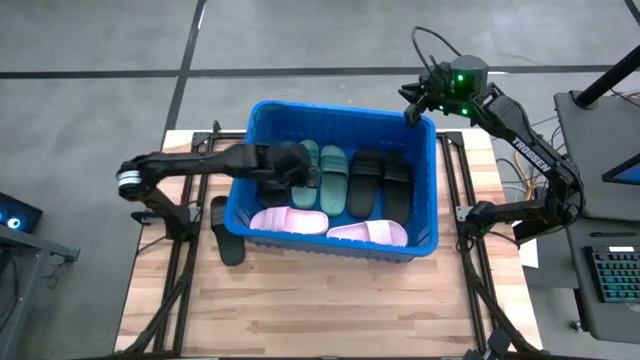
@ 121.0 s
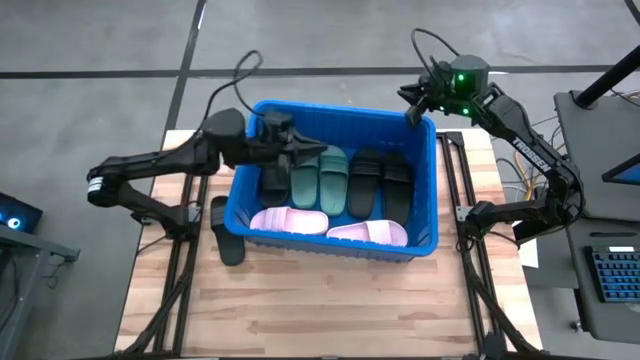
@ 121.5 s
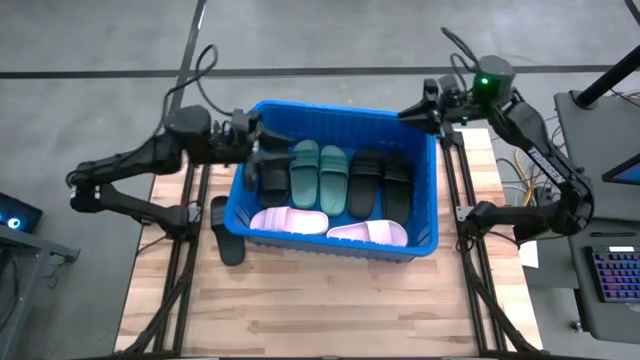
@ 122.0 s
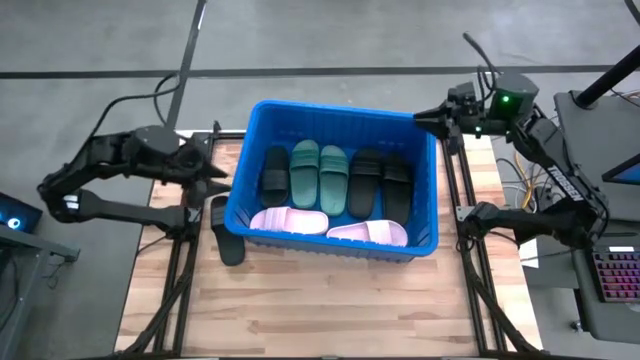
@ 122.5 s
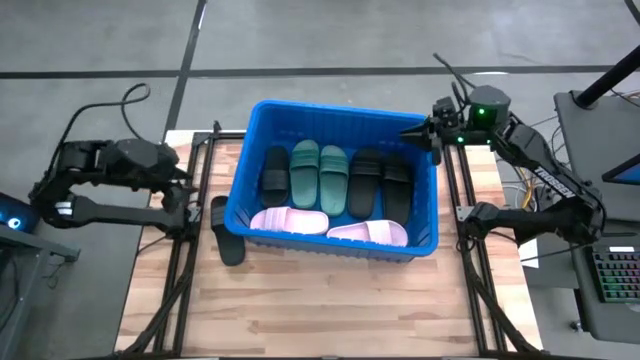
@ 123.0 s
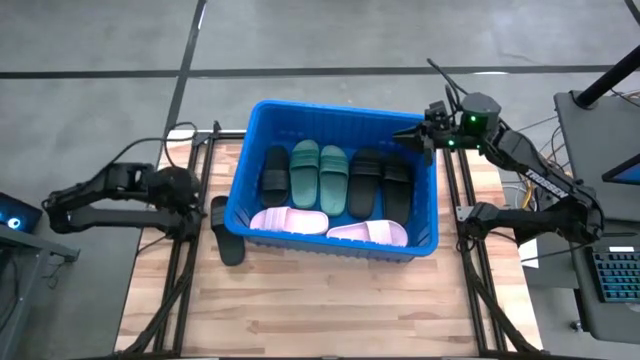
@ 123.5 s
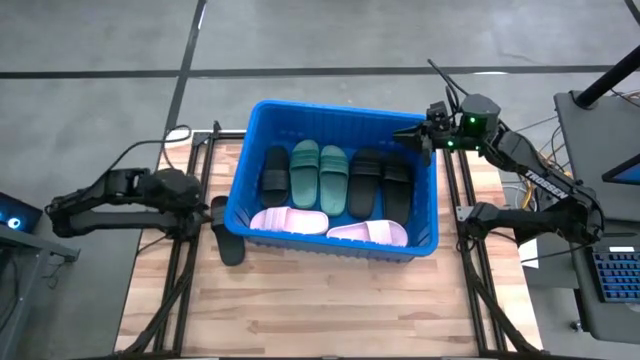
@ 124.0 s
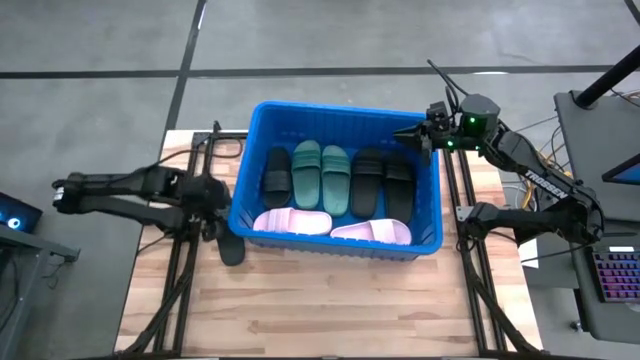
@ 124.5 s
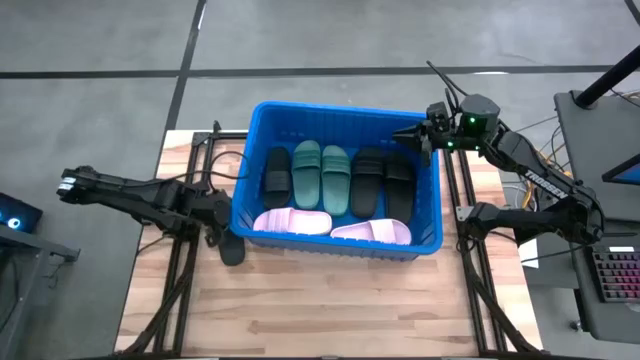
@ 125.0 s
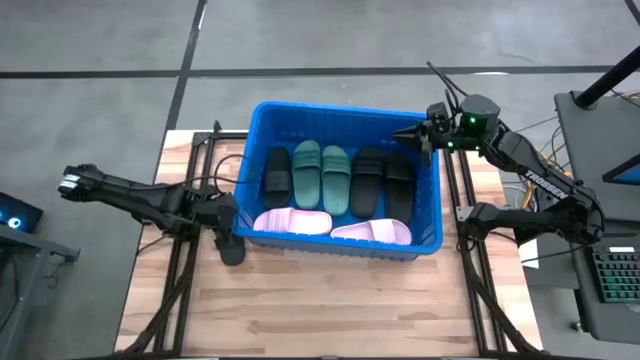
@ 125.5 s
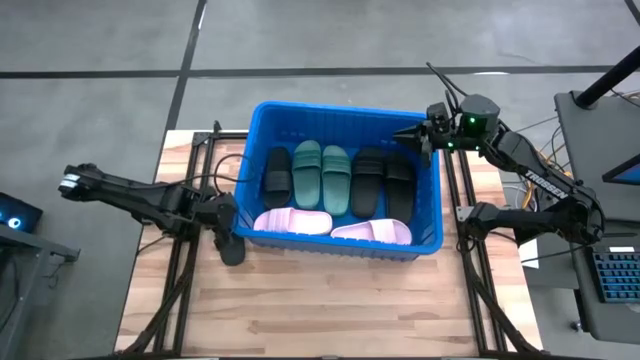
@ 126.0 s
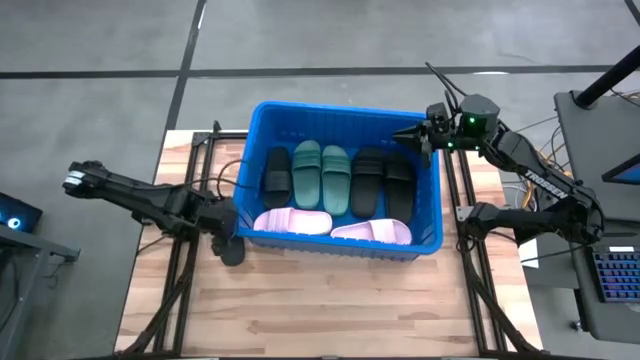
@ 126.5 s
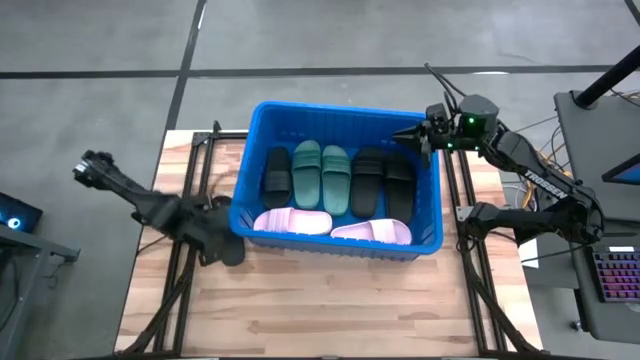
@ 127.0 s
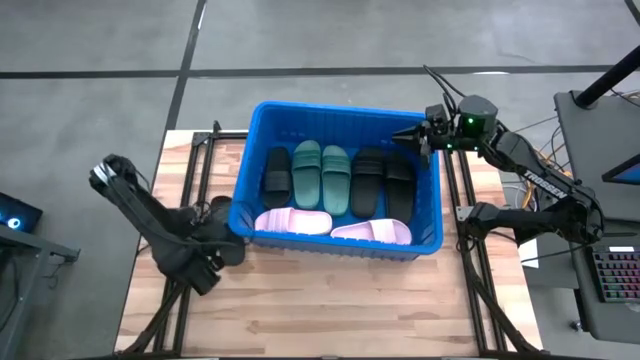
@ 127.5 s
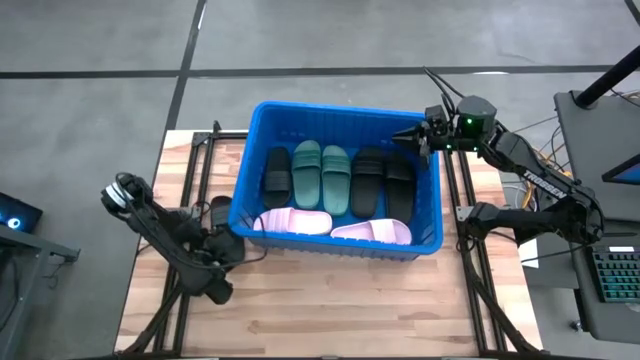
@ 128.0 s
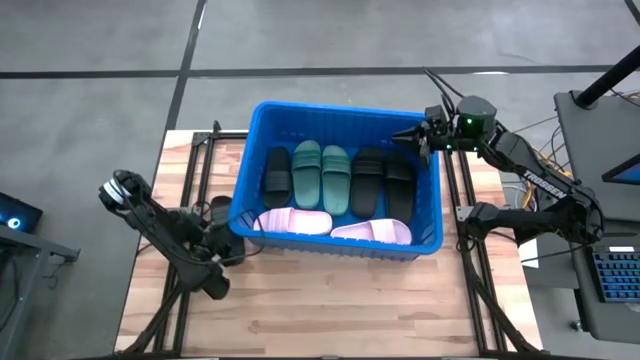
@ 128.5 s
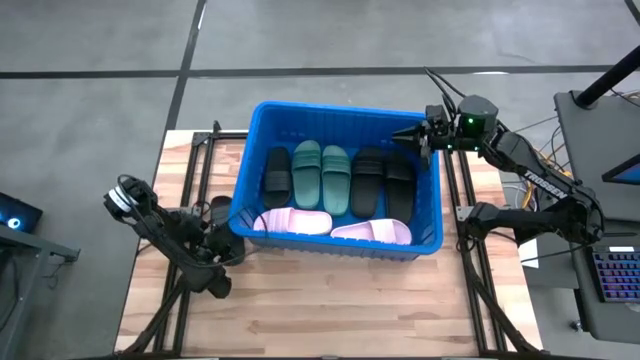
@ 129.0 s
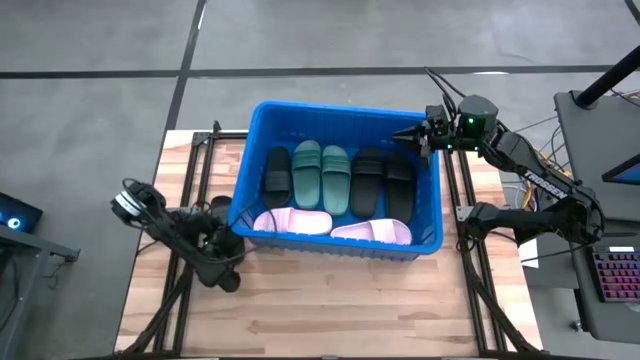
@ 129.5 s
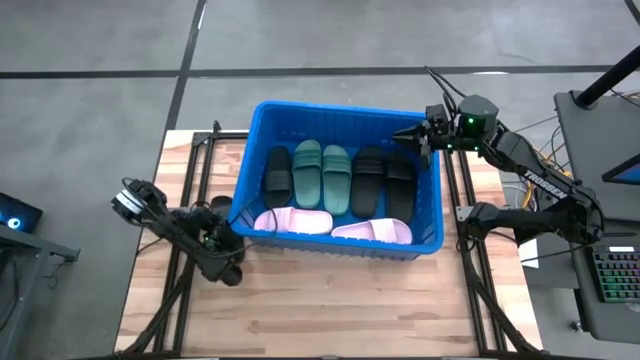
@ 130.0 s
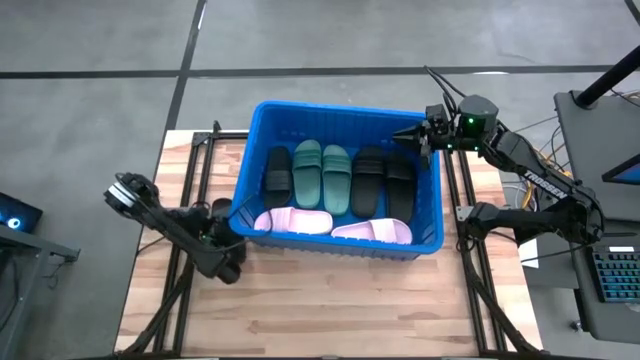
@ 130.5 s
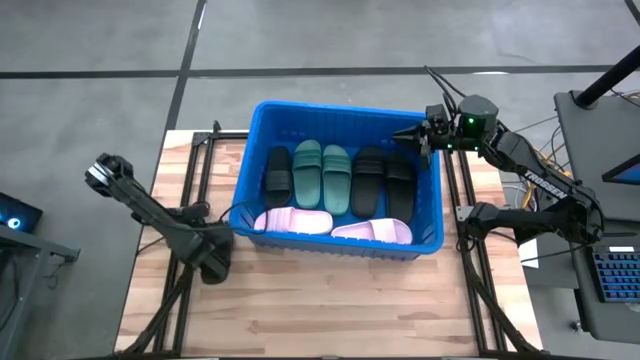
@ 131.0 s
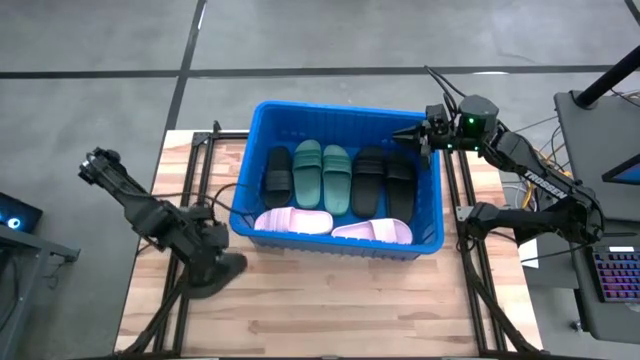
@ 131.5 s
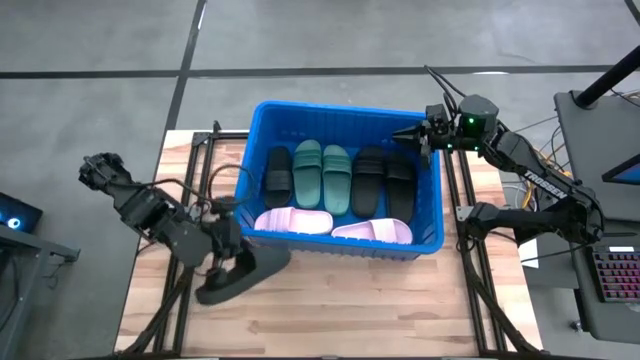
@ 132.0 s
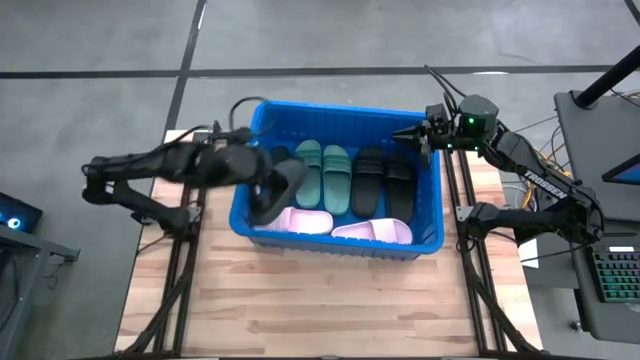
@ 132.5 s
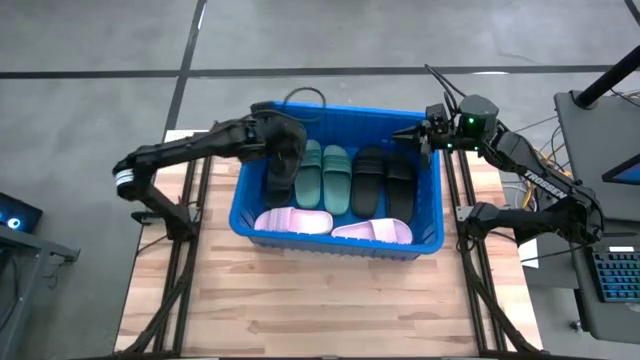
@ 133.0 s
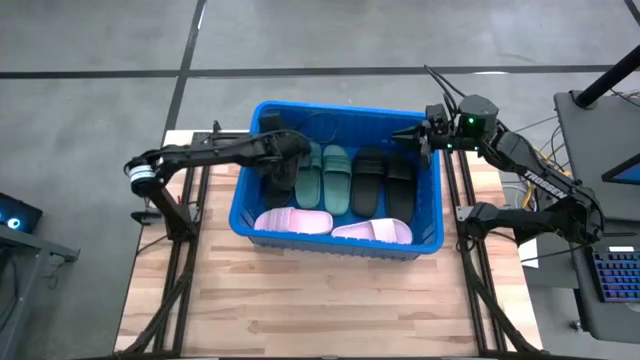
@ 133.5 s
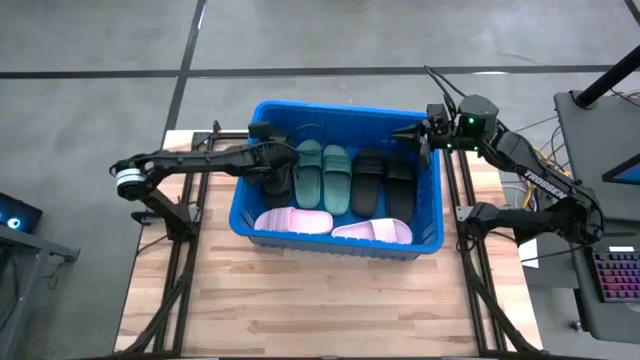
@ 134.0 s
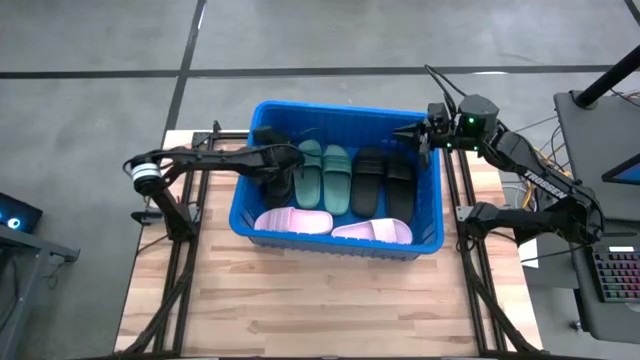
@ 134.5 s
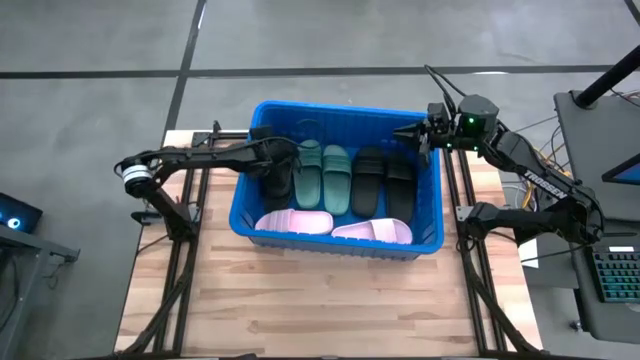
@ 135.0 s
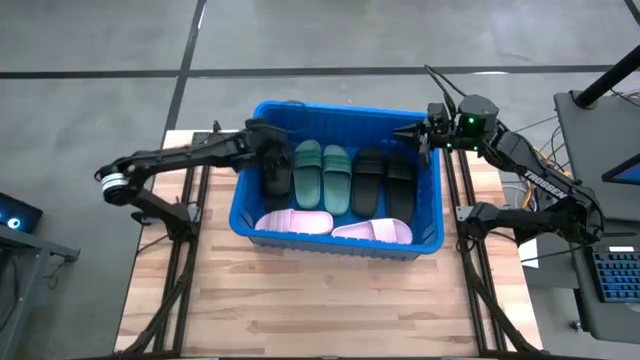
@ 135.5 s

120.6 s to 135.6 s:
Task: Pick and place slides into bin
Put the black slide into the blue container

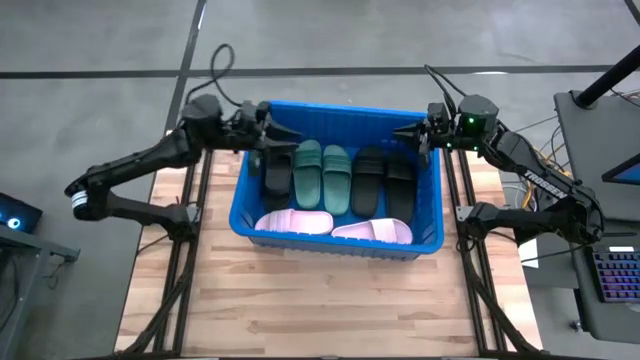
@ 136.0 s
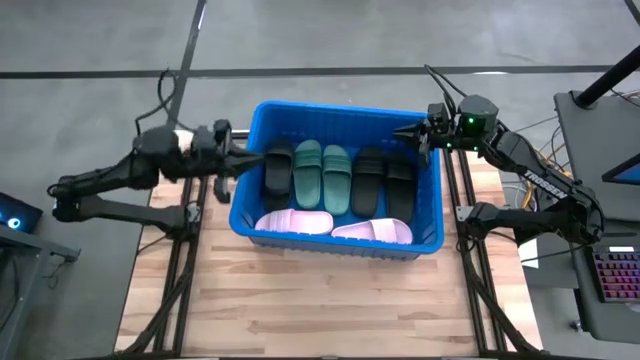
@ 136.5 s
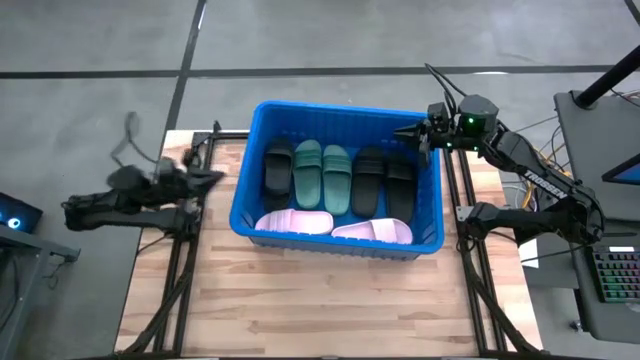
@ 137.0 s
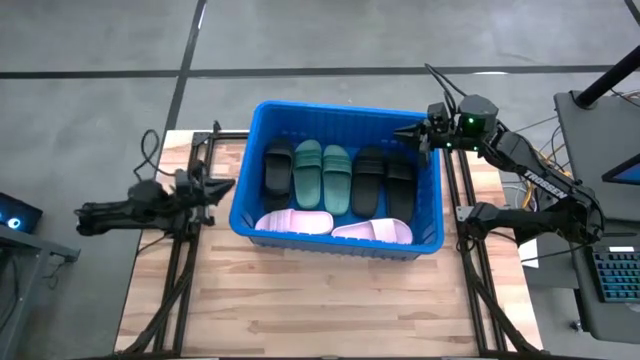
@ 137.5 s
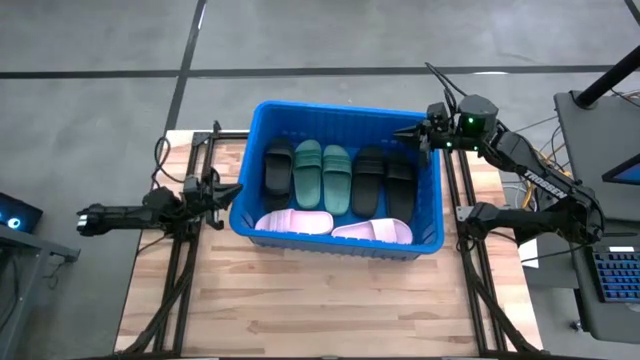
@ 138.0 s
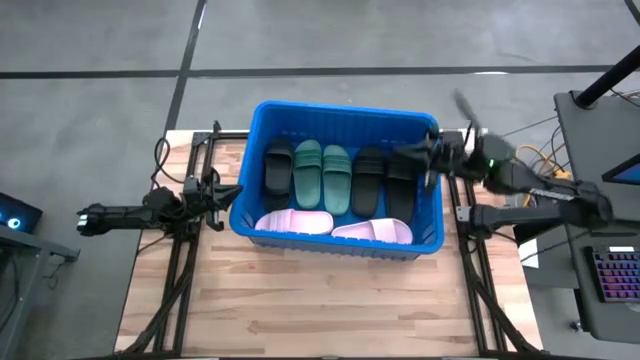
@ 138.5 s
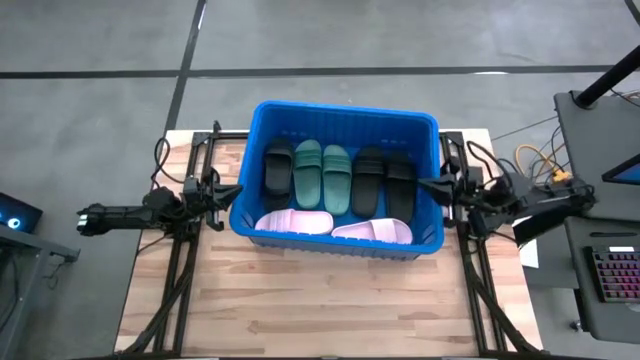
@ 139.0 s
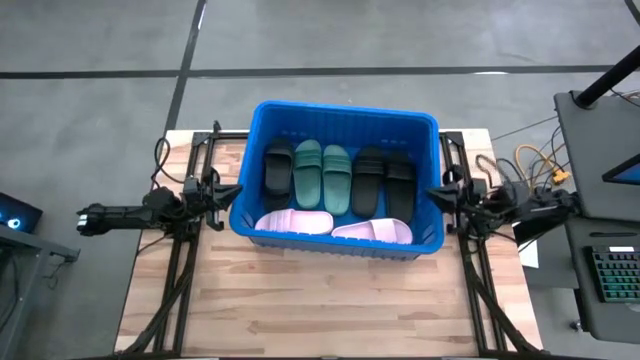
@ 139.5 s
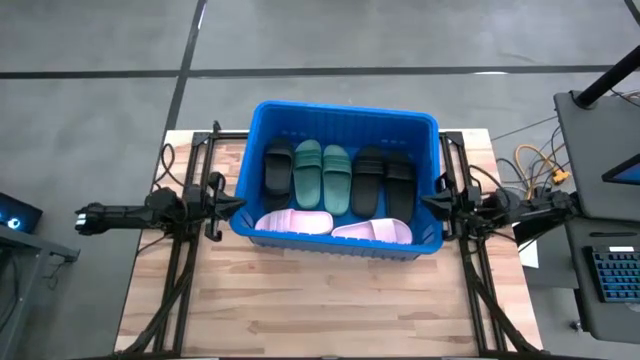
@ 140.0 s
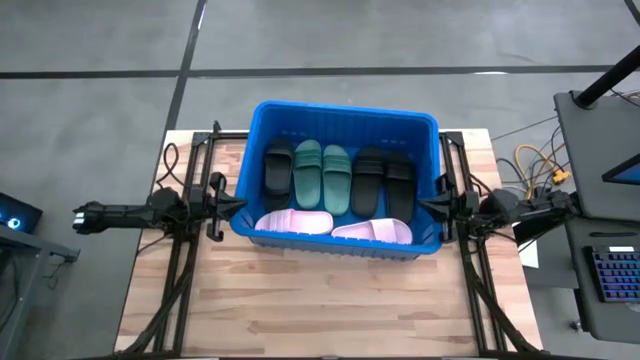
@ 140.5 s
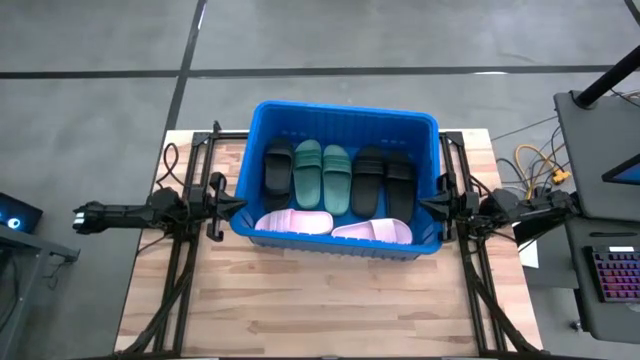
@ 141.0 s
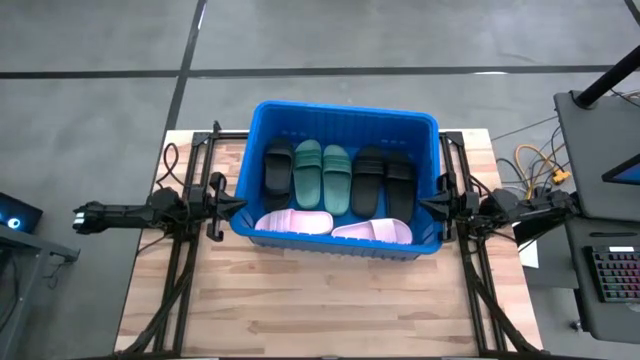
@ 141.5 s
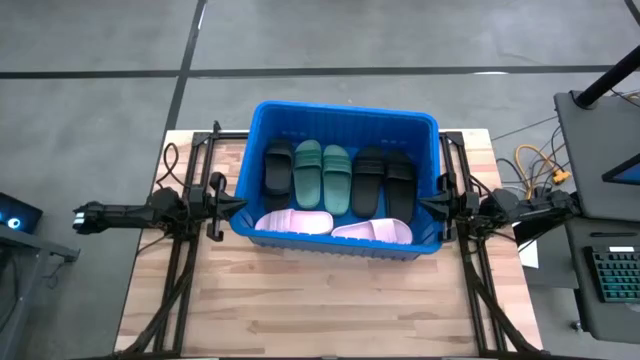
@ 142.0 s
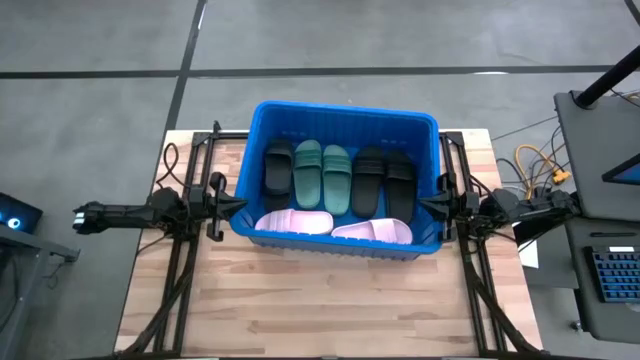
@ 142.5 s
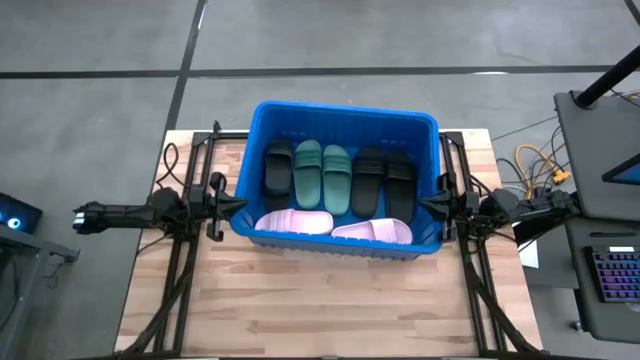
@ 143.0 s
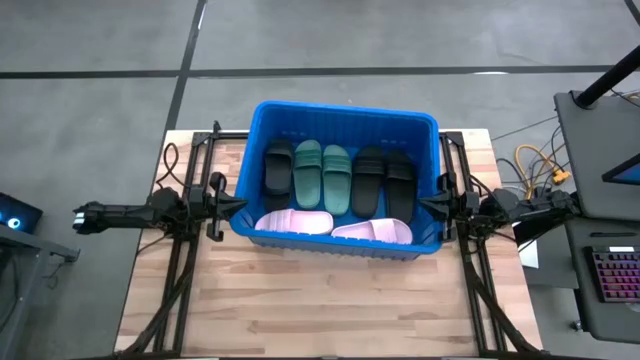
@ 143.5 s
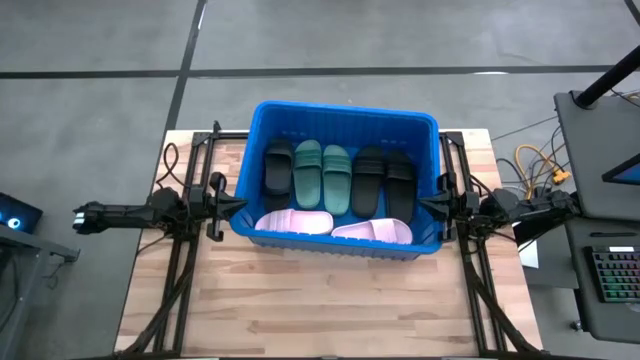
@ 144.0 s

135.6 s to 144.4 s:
Return to Home Position
